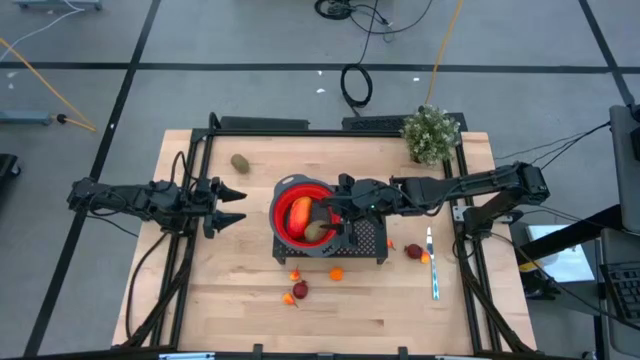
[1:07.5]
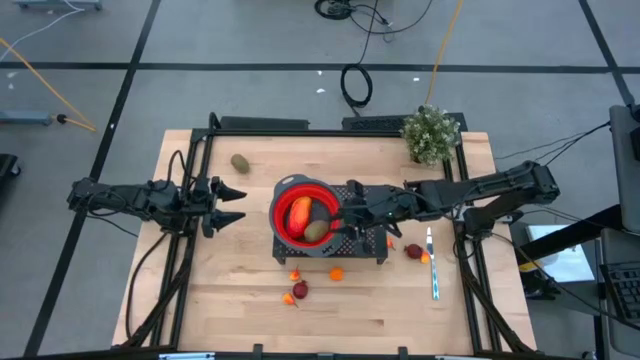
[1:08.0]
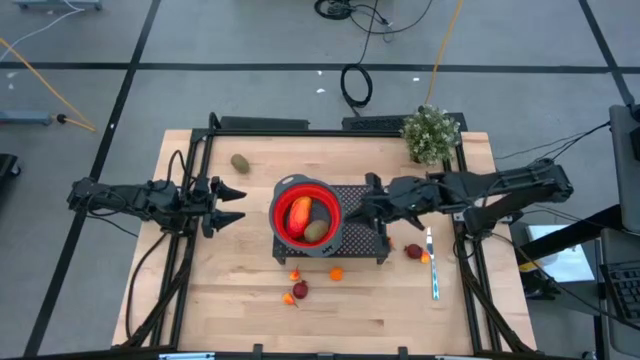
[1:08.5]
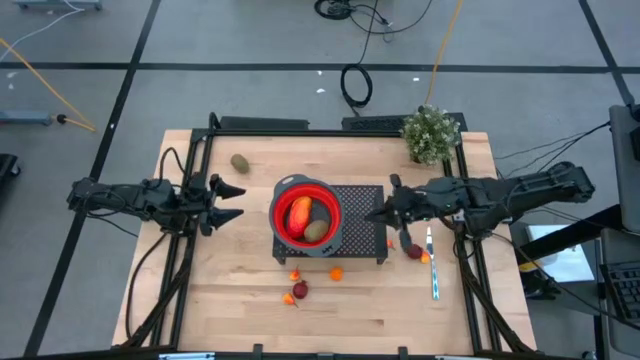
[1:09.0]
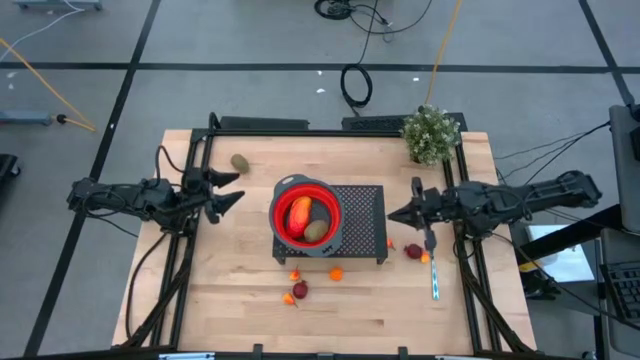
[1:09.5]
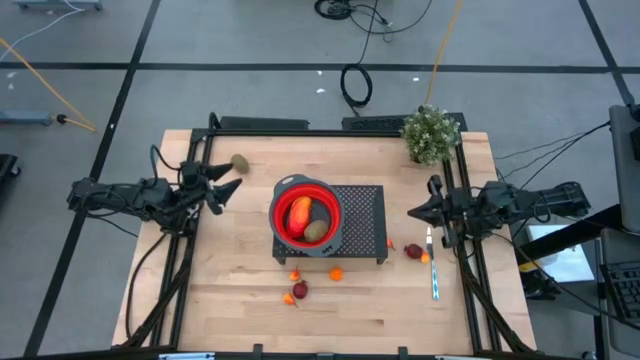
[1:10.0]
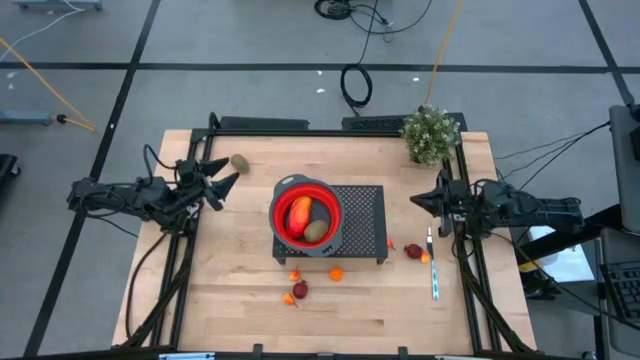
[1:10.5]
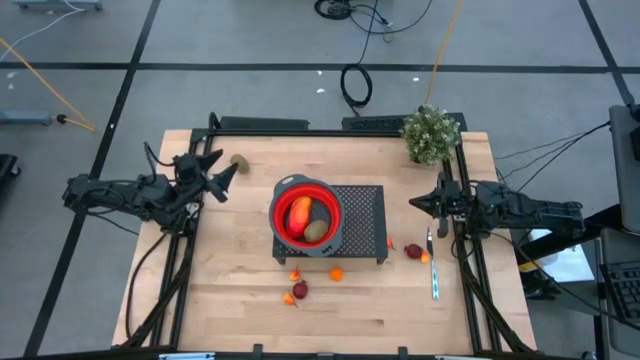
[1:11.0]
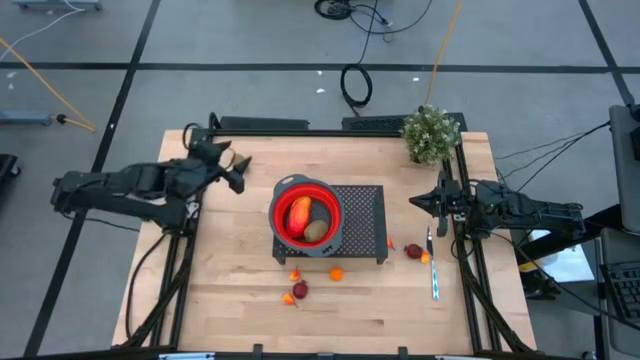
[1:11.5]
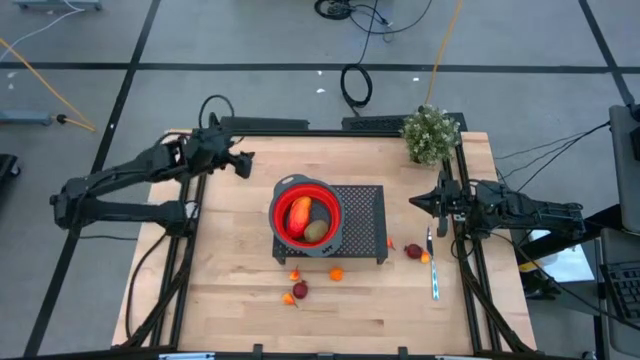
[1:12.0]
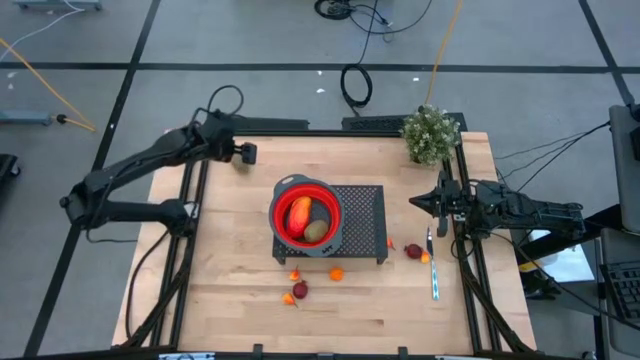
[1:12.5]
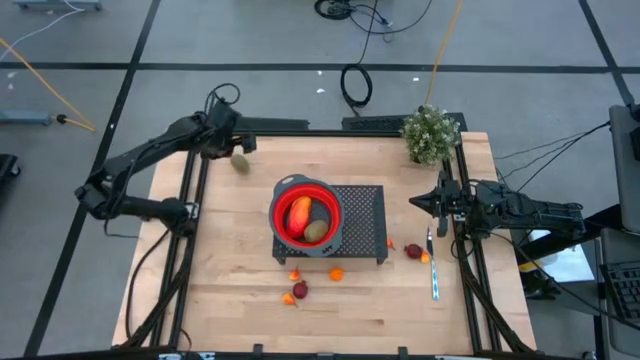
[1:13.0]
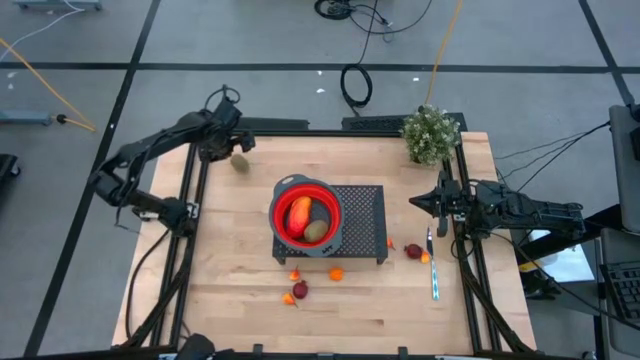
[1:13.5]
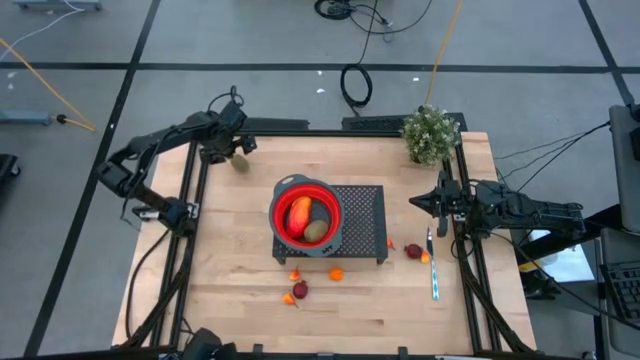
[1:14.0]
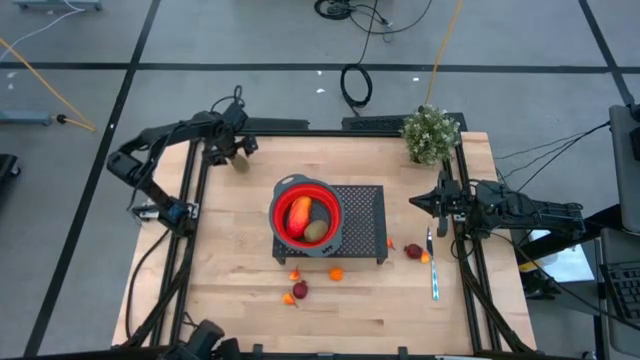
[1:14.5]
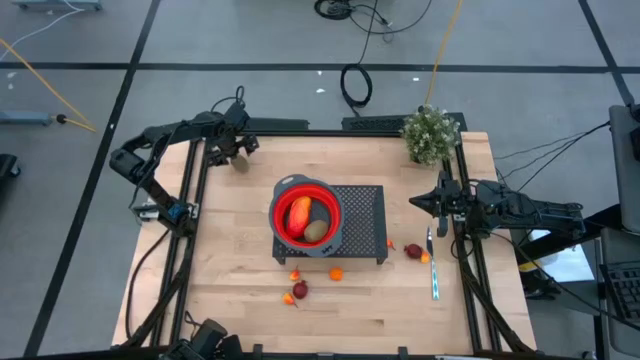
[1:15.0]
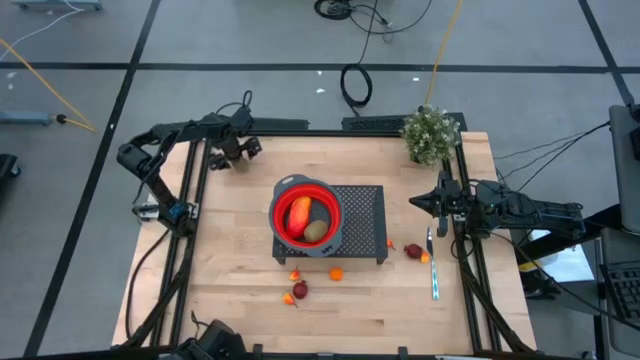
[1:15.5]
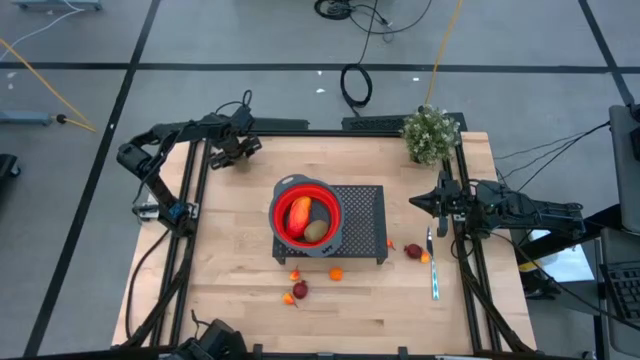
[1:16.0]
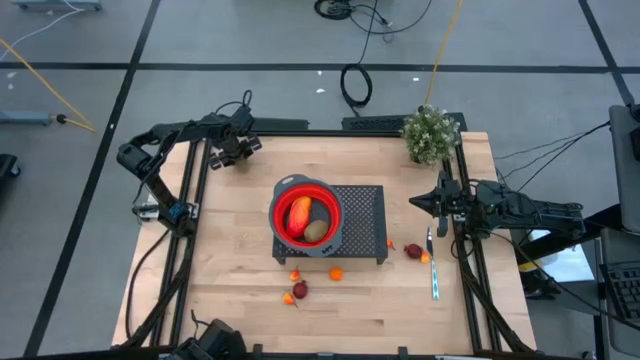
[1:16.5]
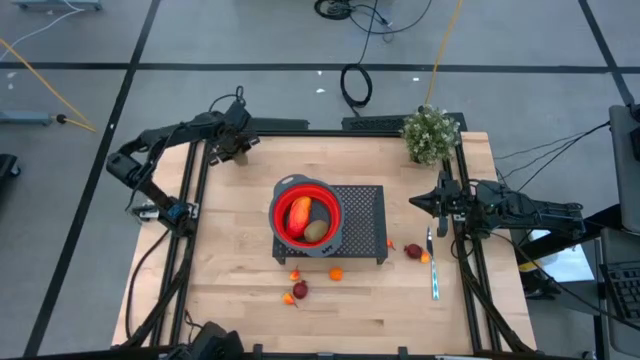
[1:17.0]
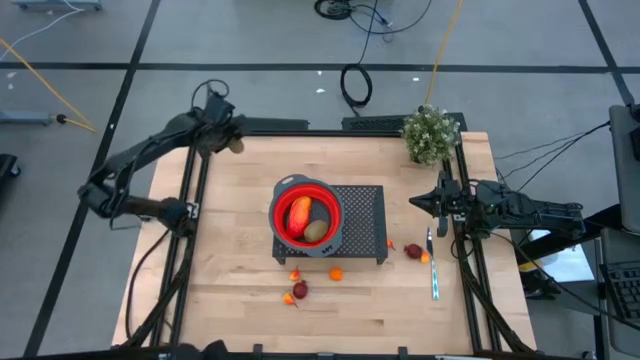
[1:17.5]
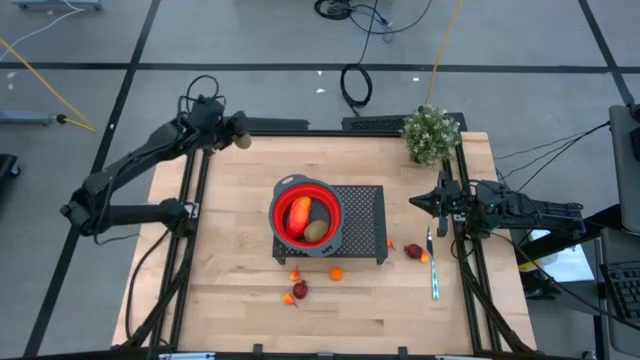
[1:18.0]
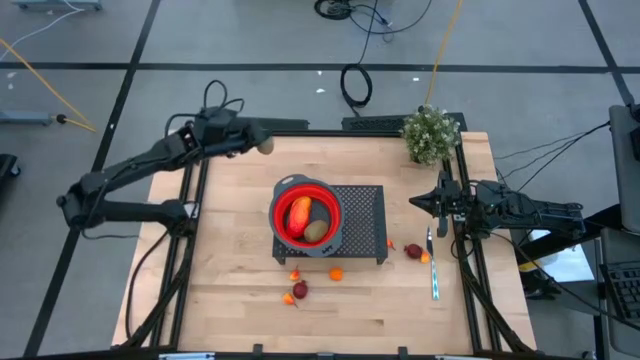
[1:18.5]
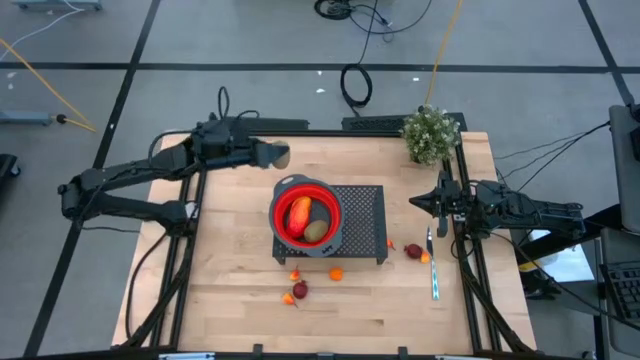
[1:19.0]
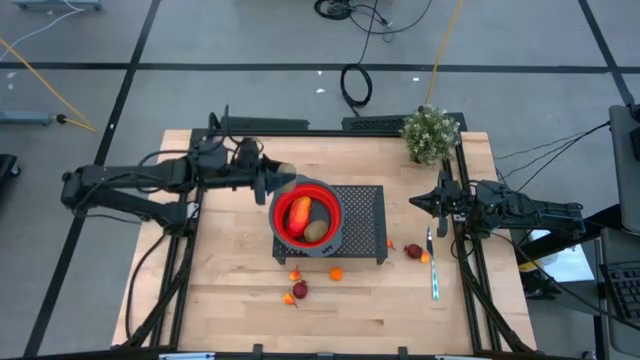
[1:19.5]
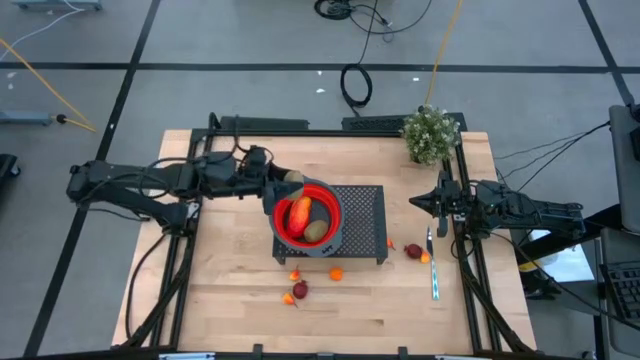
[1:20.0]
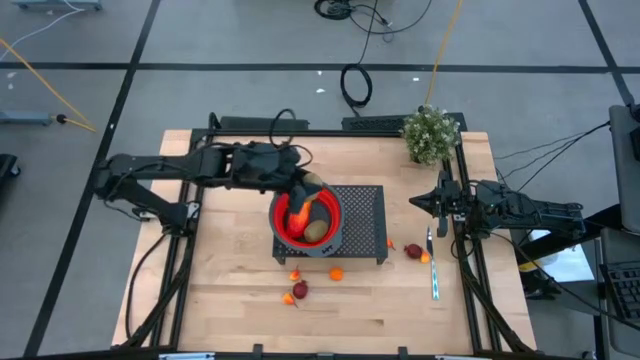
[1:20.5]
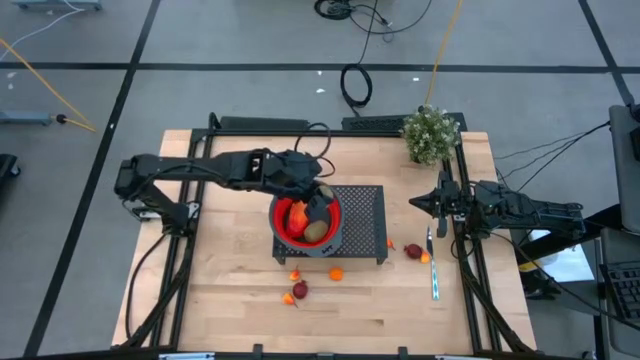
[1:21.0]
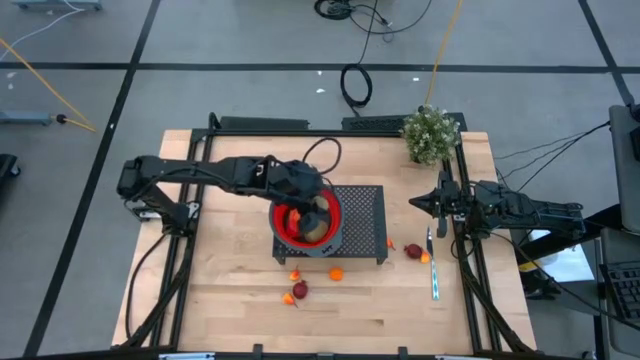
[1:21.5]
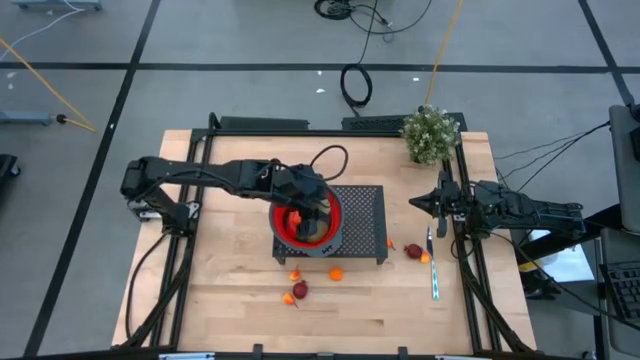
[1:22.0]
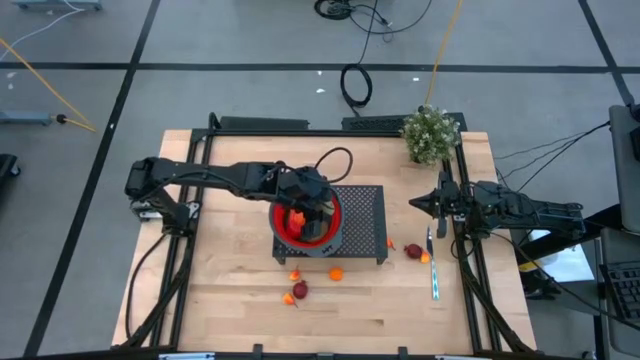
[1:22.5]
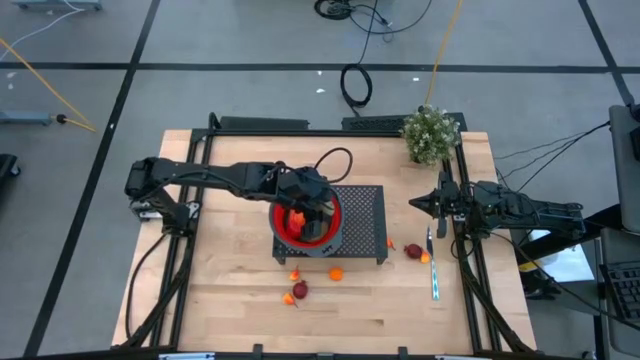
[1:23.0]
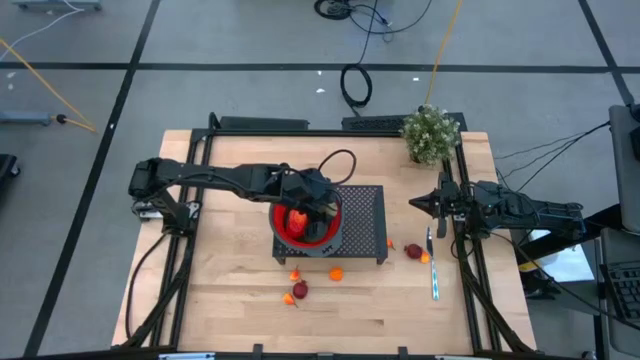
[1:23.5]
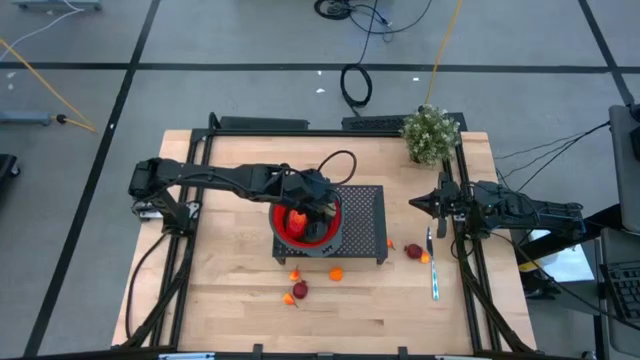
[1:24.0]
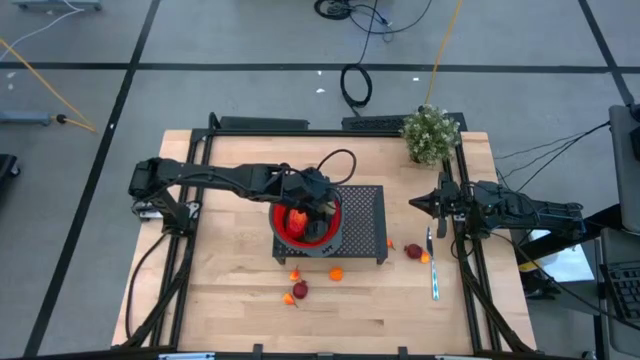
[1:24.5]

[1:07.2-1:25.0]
Task: Pick & Place Fruit
Put the kiwi into the red colander on the shelf

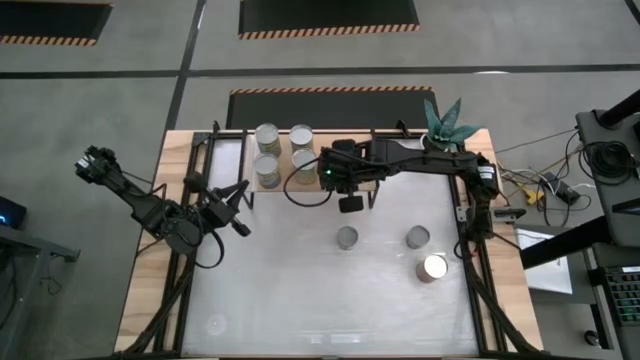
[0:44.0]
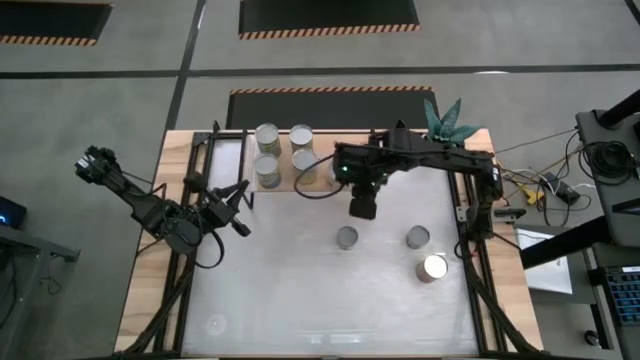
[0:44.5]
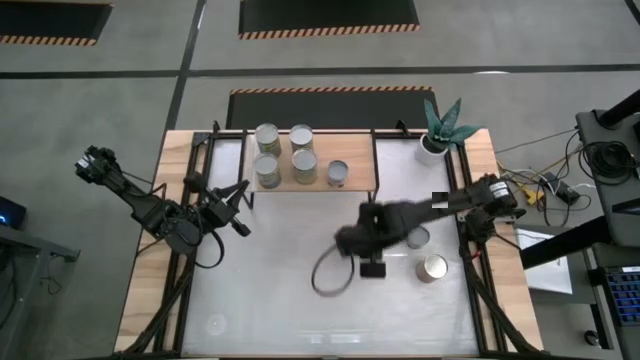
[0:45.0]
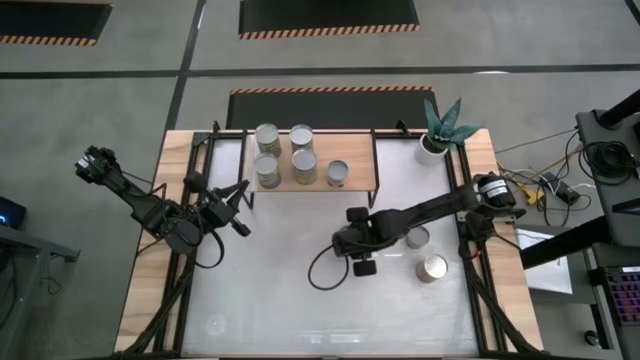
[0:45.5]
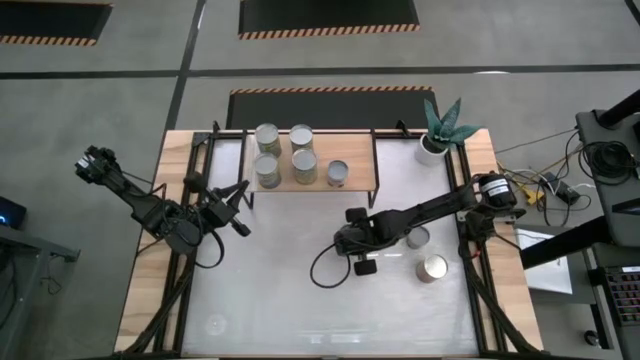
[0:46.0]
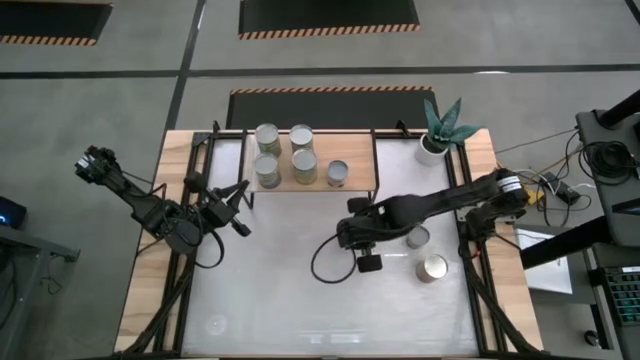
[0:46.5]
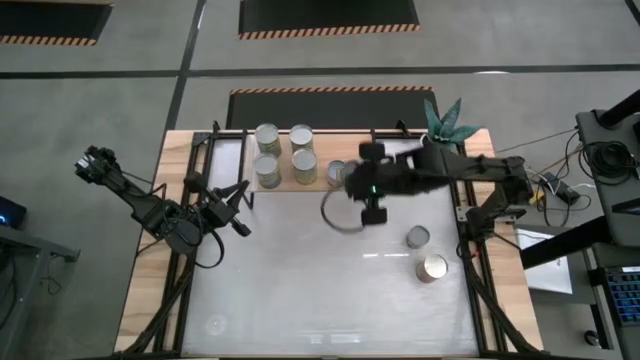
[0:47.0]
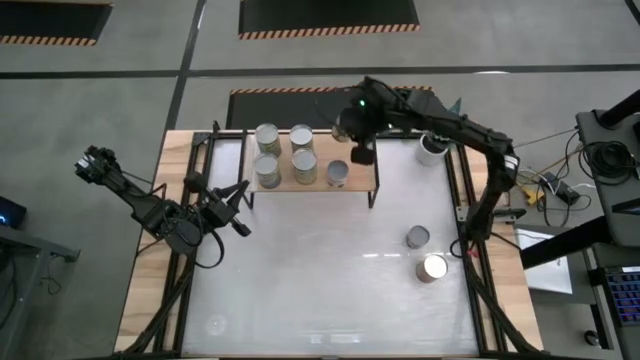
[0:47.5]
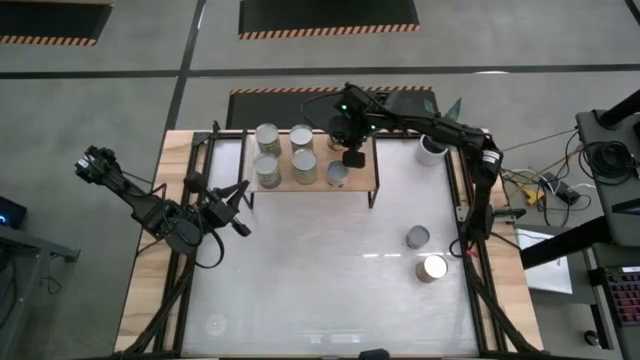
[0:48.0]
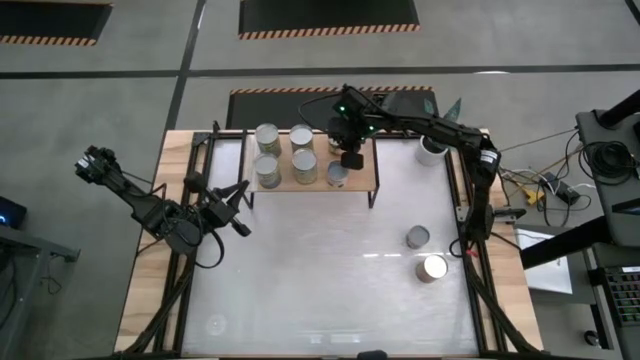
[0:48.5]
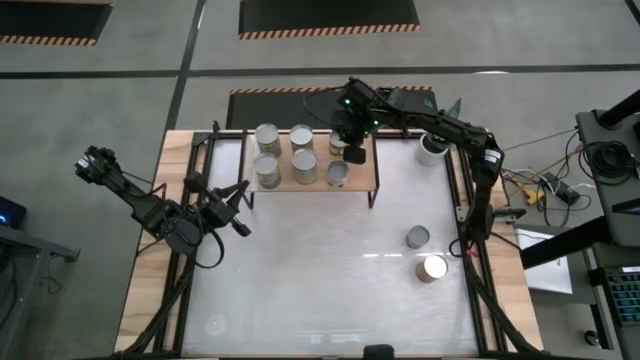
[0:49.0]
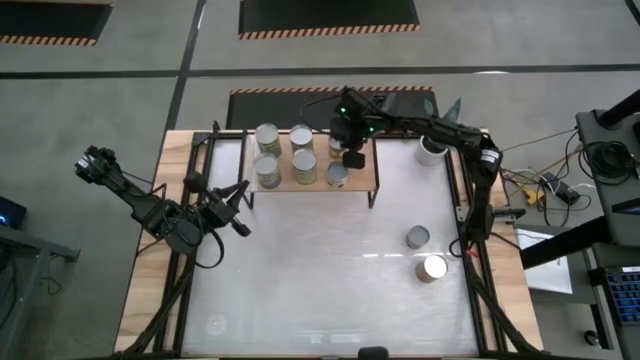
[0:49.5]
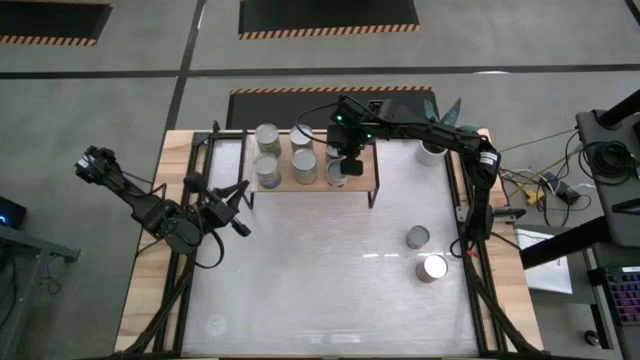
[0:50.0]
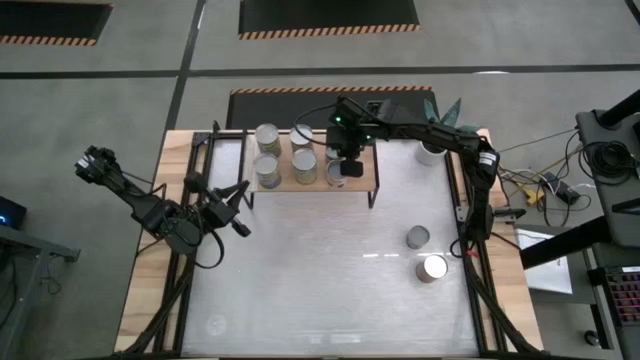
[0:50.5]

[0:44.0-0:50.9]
Task: Pick and place cans onto a shelf
Put the canned sliced peaches on the shelf
